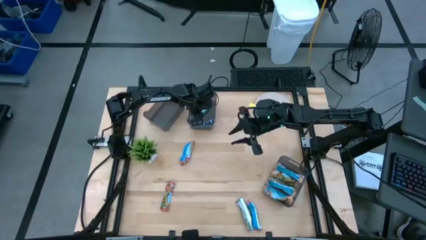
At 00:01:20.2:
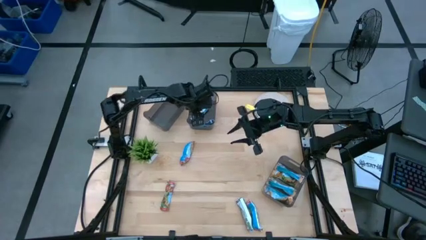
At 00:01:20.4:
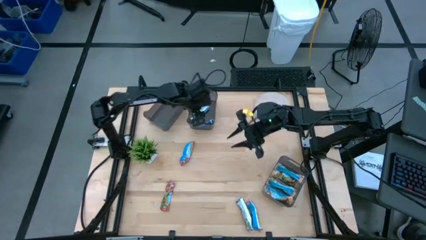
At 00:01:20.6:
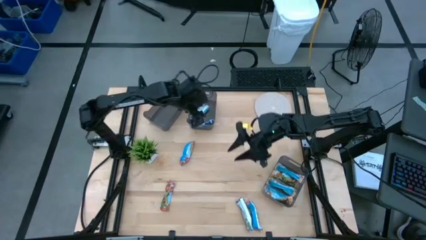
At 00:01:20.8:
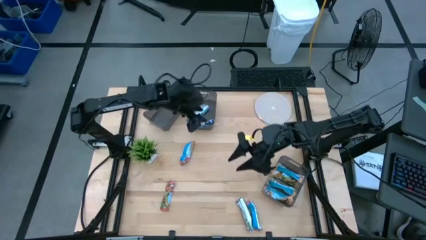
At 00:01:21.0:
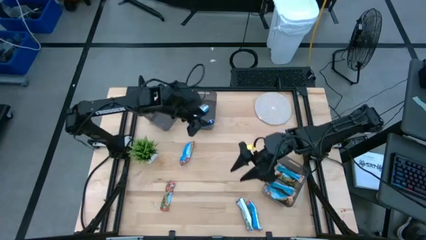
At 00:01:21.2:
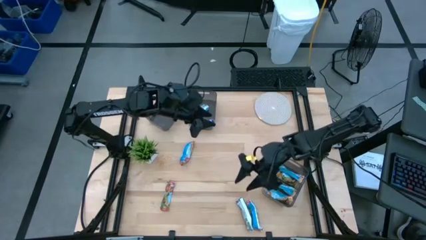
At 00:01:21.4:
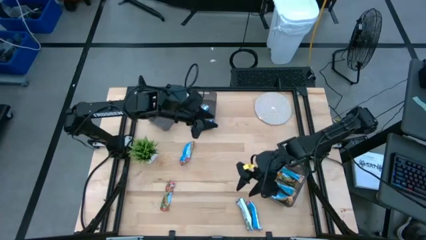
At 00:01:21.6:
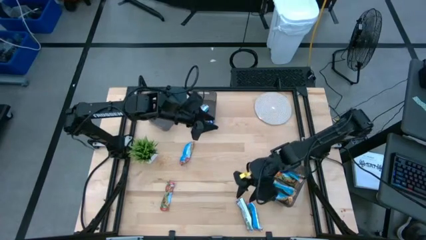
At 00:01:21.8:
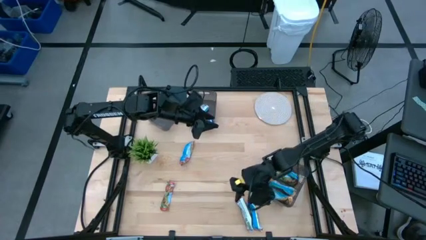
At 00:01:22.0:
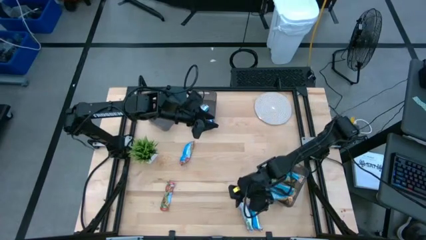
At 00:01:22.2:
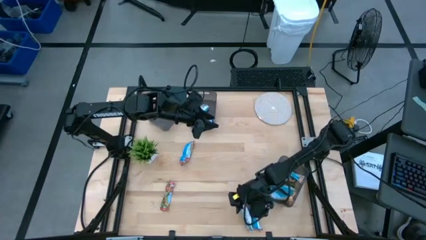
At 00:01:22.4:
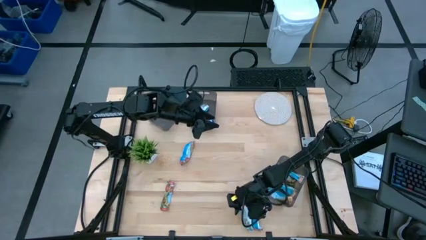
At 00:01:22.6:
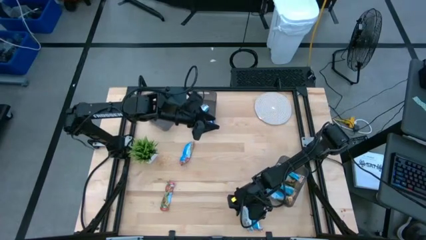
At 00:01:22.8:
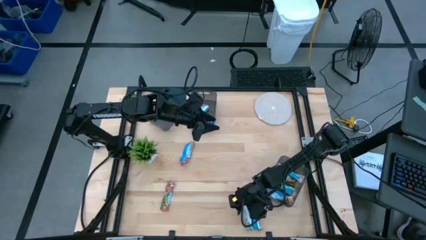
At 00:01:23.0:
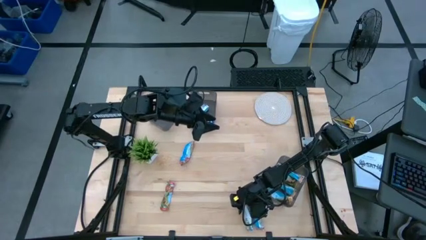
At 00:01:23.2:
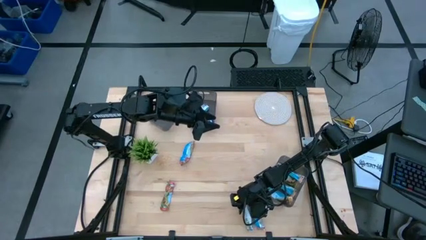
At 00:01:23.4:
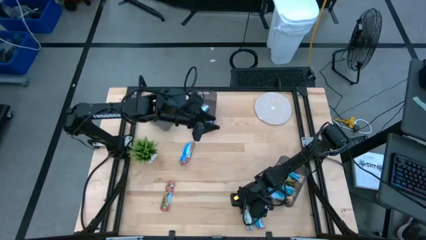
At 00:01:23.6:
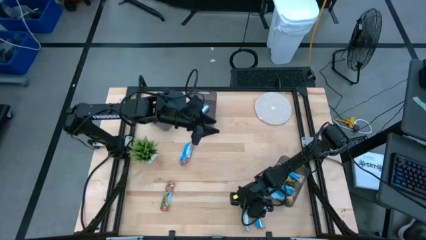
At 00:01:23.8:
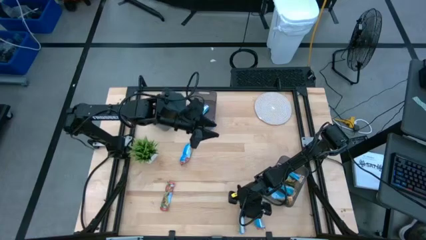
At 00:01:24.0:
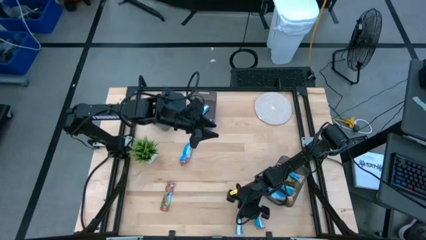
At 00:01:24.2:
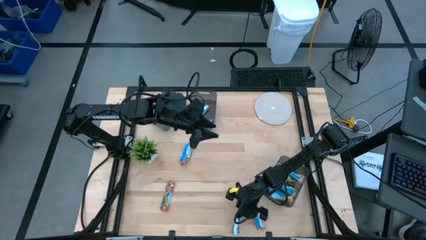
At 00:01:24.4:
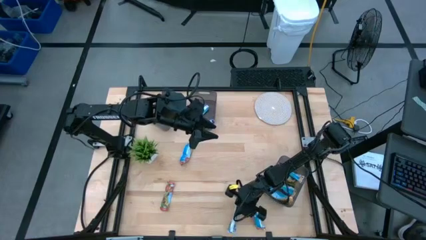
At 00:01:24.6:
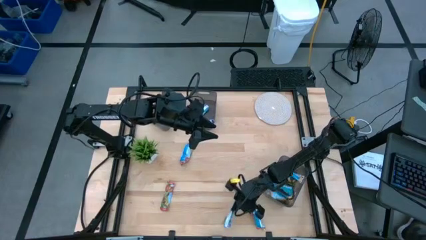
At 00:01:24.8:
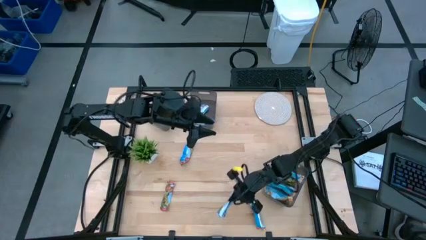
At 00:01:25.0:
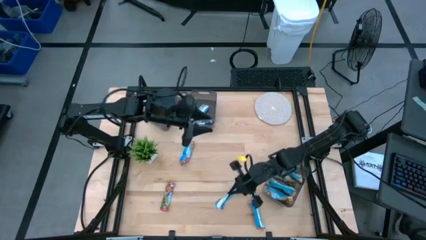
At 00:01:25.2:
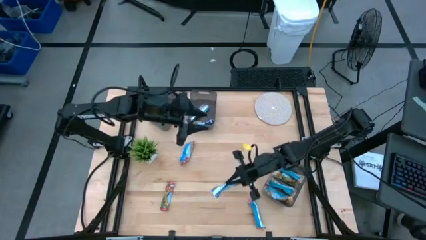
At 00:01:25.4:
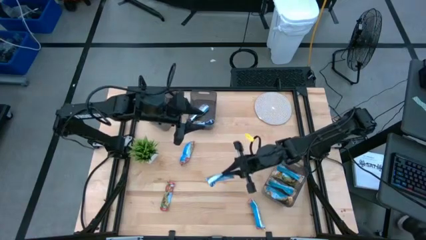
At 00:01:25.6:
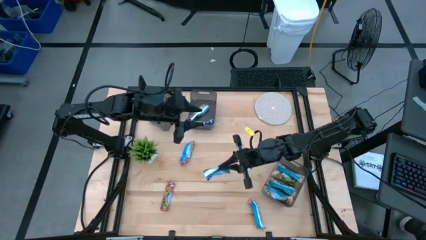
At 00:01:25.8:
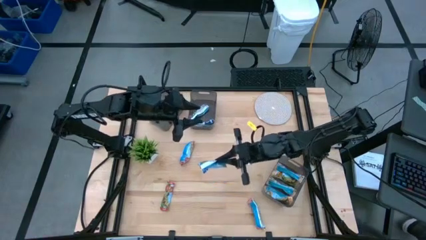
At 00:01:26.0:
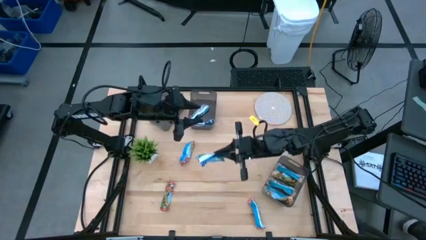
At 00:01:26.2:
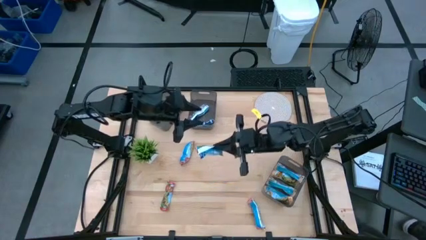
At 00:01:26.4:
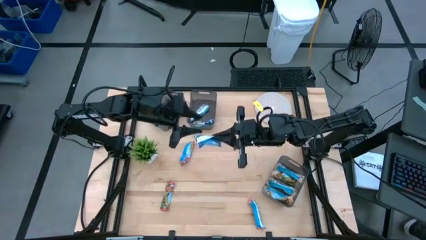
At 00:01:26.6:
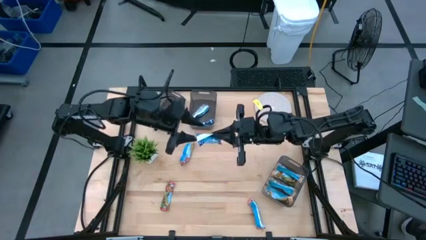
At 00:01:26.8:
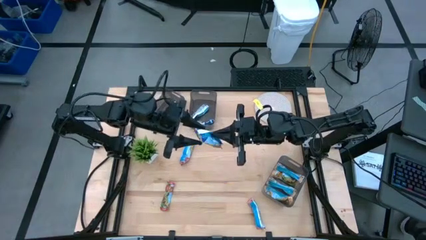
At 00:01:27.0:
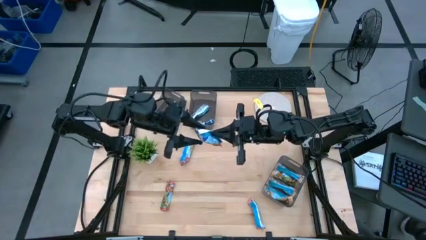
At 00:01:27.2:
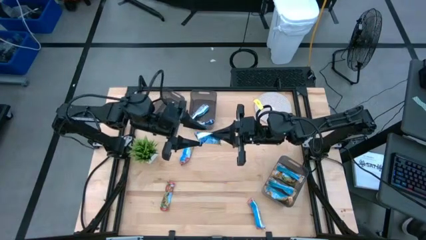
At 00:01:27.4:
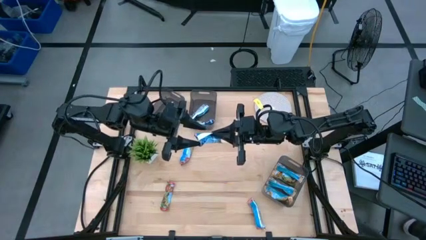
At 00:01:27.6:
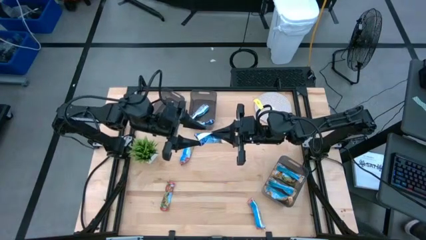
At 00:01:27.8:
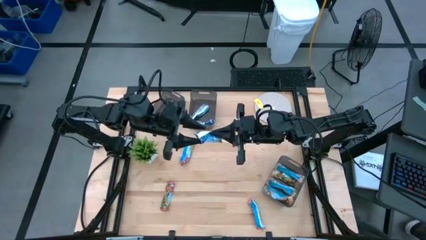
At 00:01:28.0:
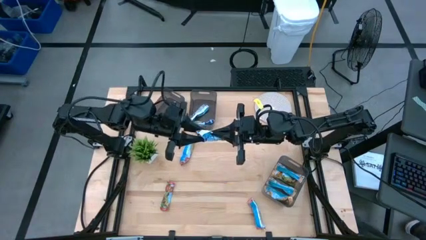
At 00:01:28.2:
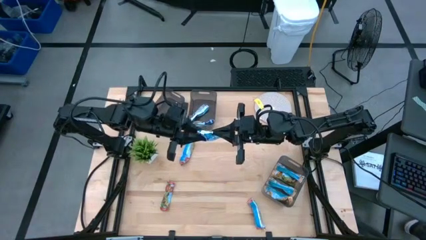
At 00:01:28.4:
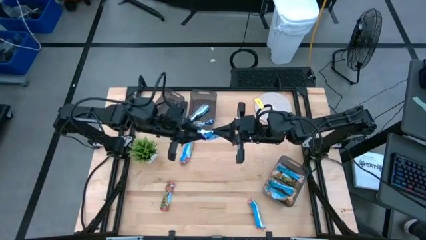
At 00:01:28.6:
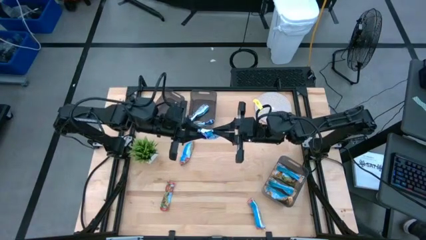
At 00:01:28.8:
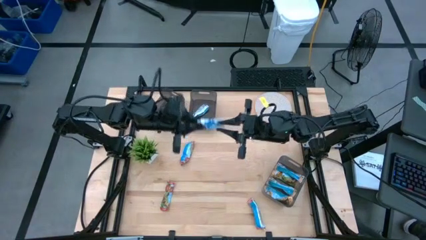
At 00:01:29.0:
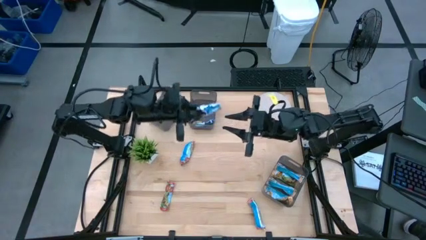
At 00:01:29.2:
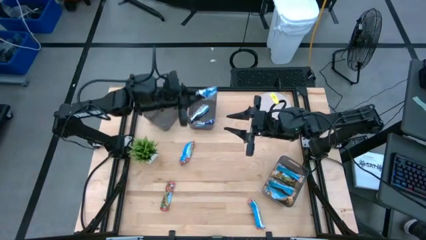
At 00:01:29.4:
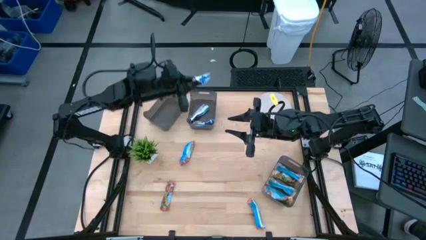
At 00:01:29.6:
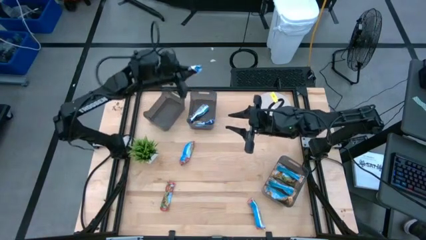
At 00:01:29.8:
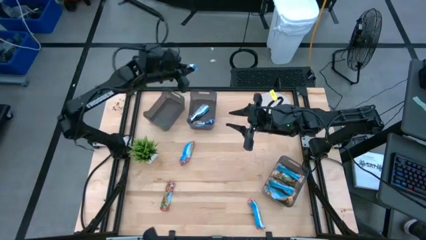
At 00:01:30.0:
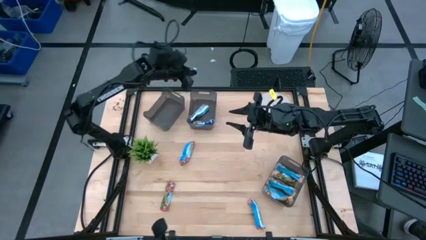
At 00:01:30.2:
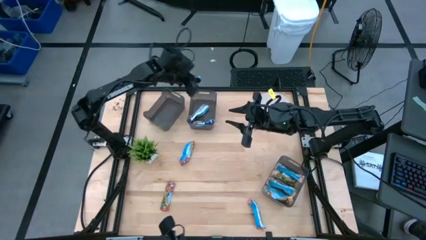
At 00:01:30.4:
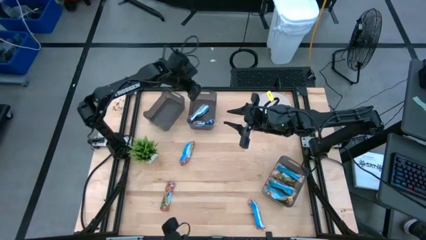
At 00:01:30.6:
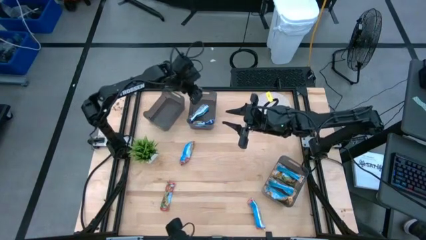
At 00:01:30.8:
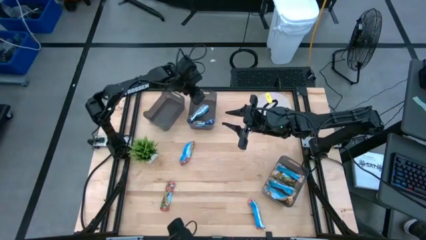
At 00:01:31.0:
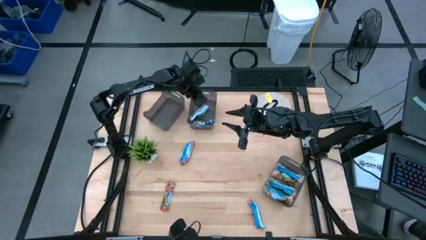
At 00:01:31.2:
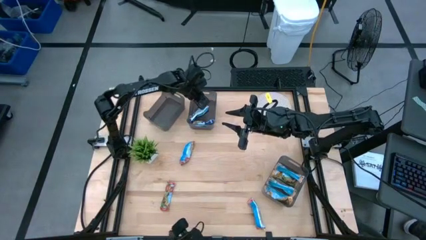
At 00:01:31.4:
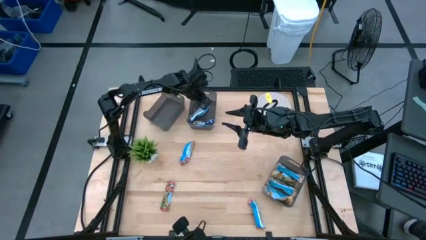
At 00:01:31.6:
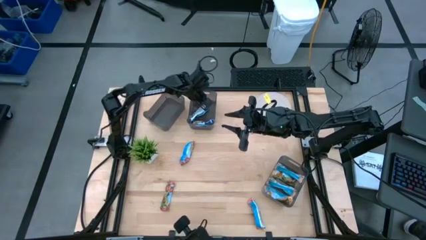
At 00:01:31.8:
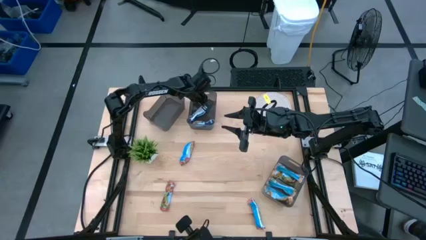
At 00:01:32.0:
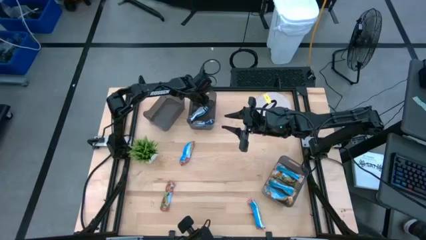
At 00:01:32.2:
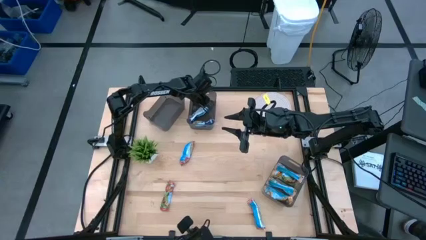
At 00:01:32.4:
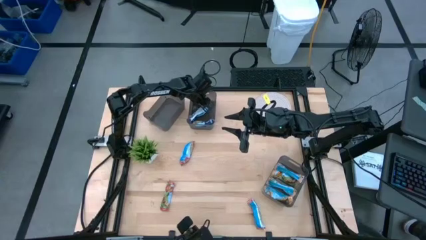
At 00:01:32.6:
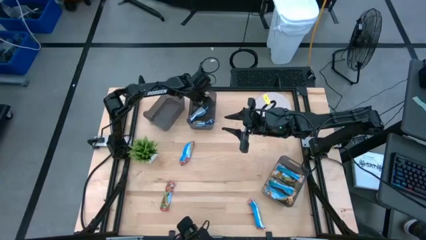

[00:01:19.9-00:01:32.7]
Task: Pick and place Granola Bars by type
Put the blue granola bar into the top right black transparent bin
